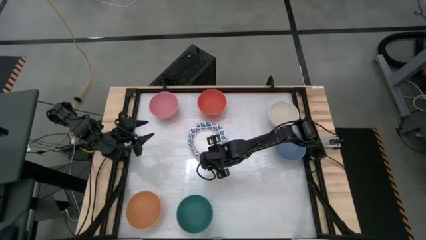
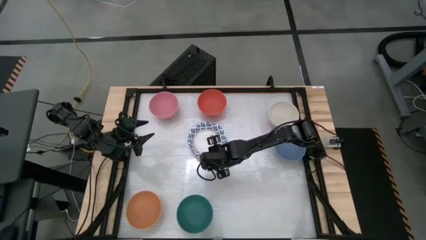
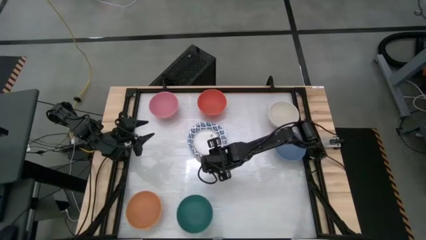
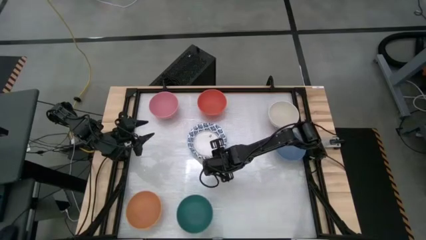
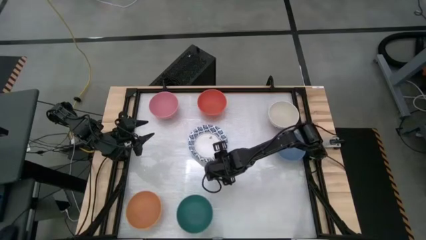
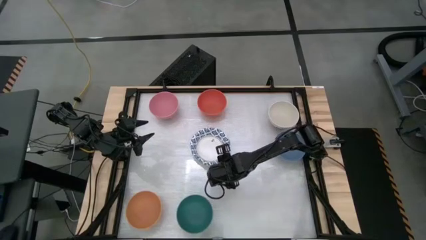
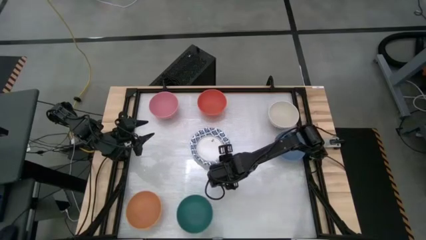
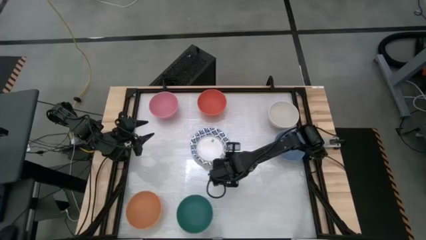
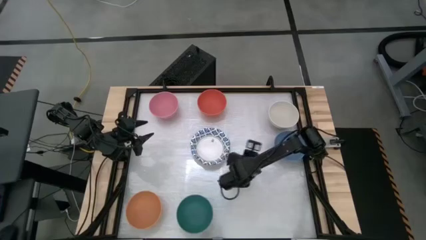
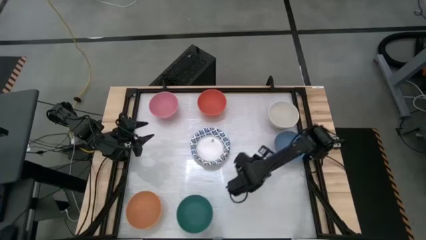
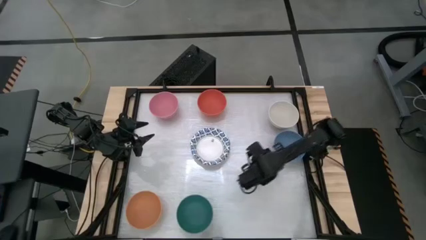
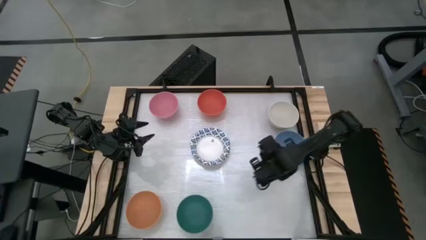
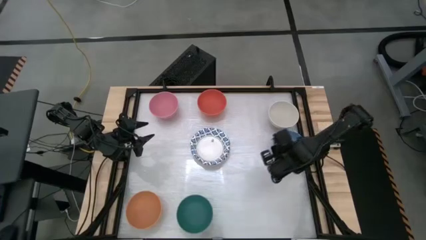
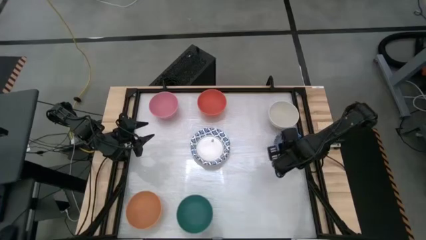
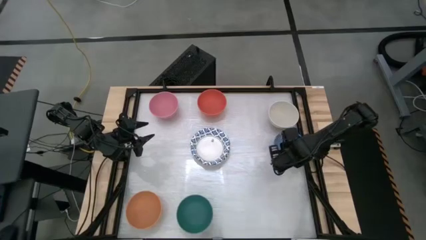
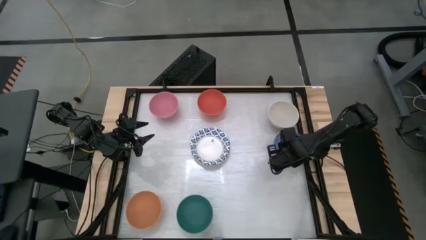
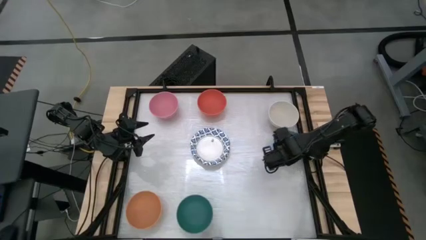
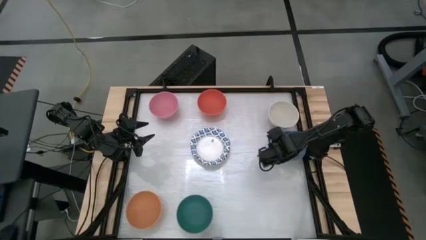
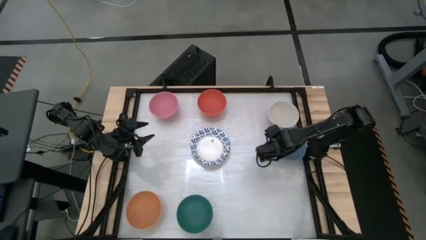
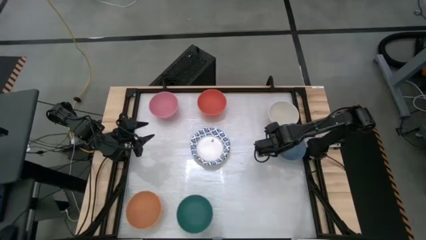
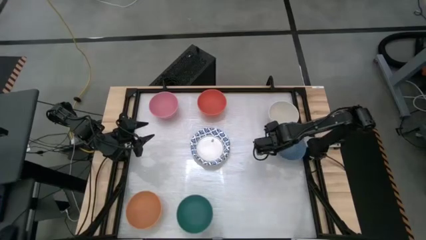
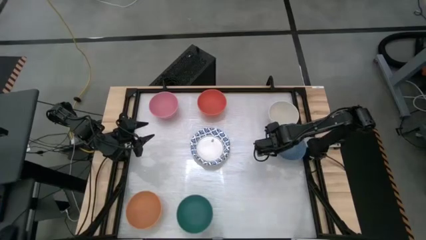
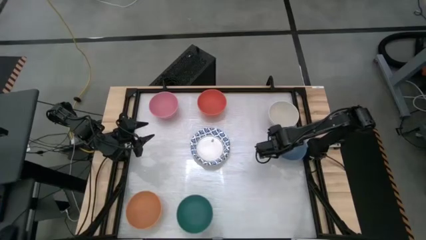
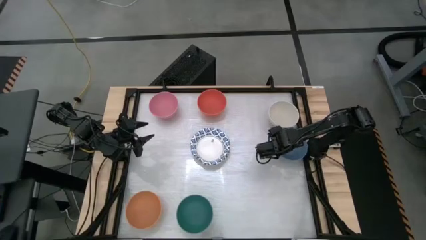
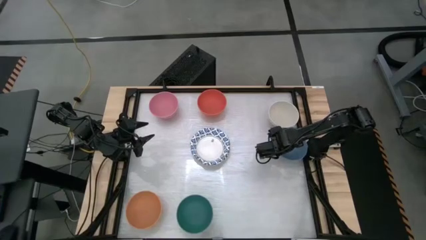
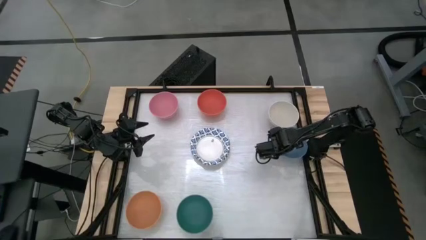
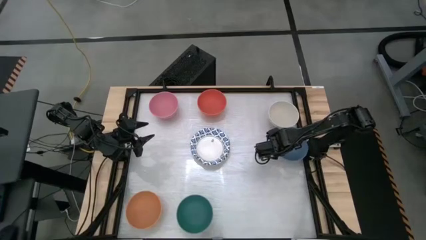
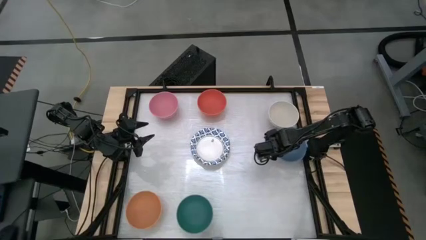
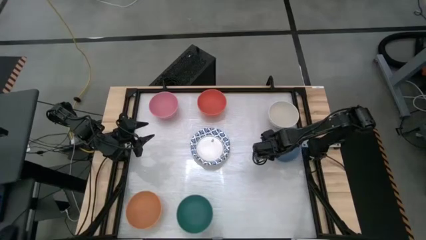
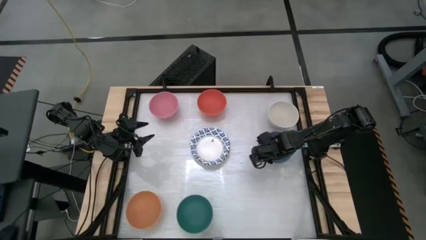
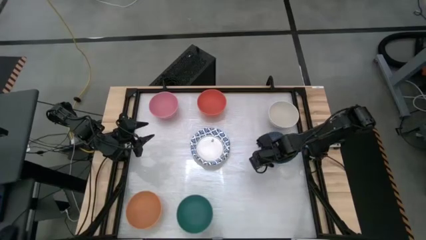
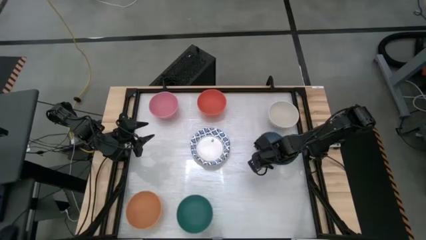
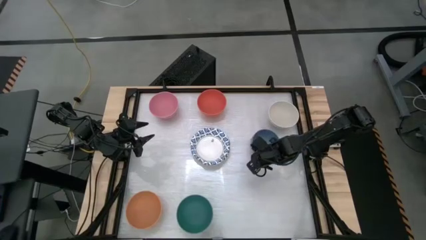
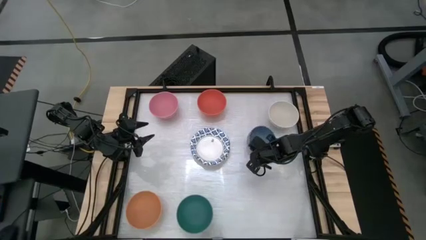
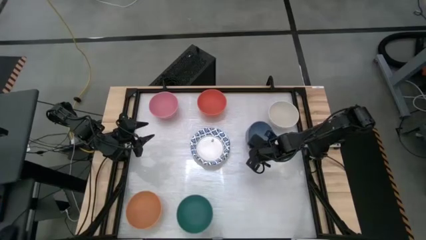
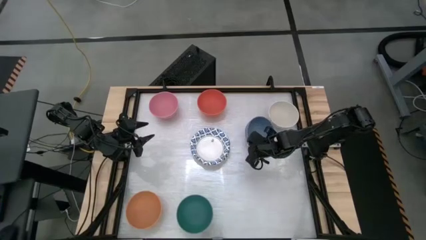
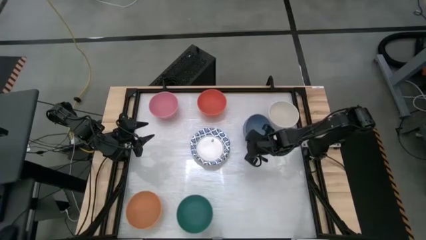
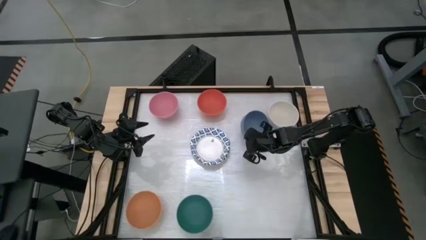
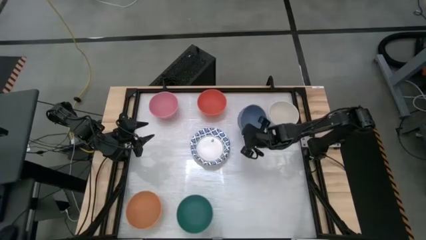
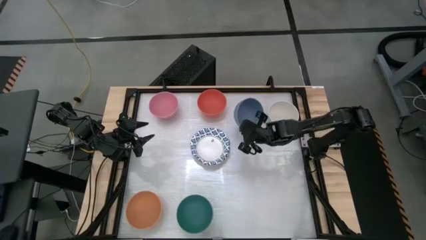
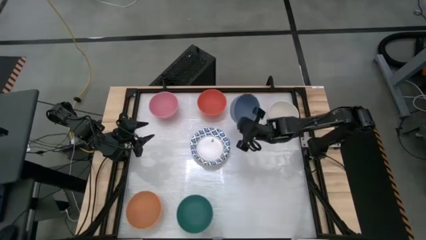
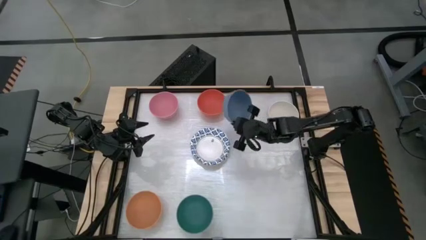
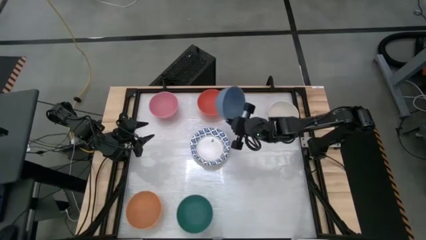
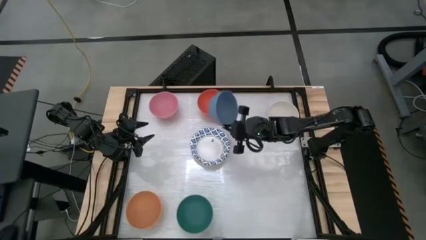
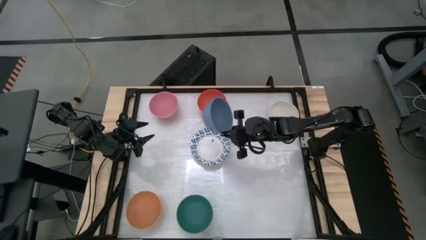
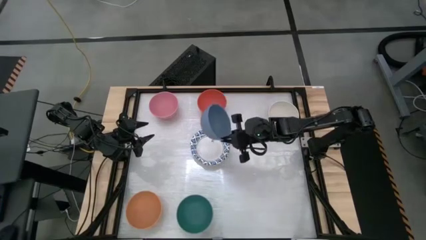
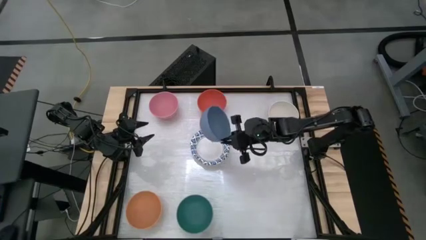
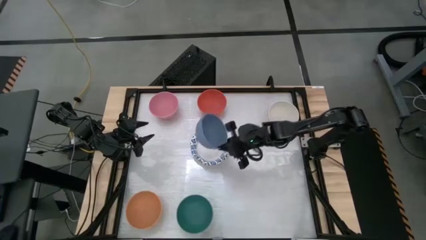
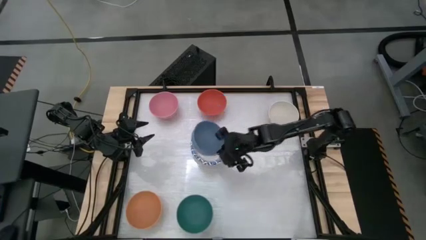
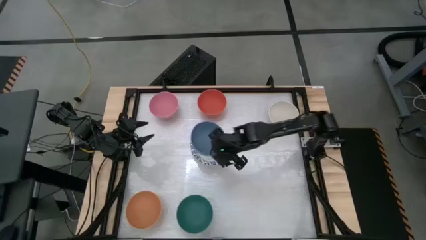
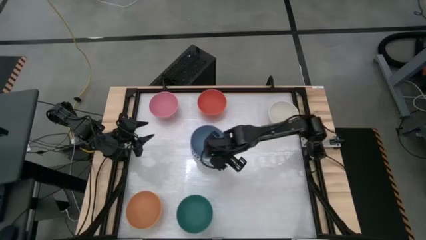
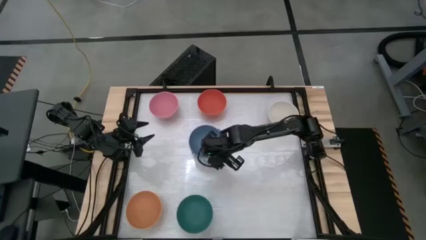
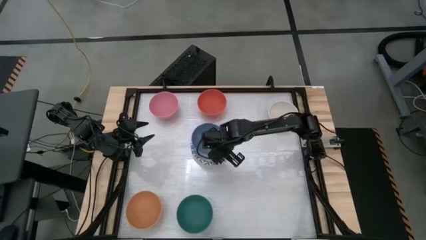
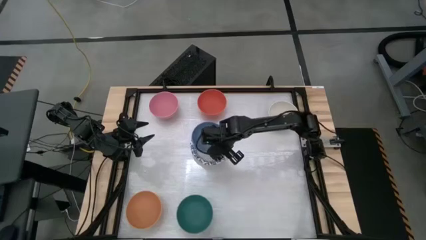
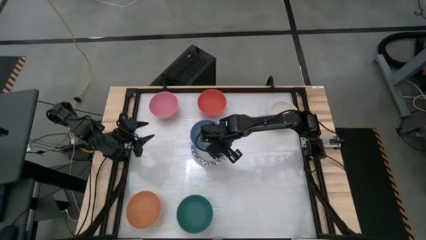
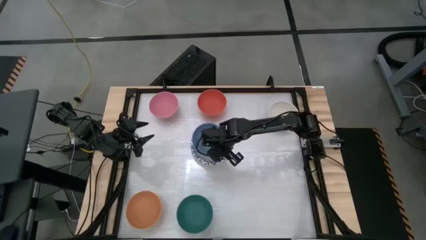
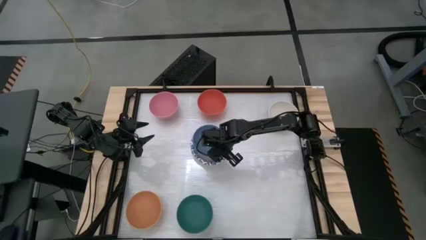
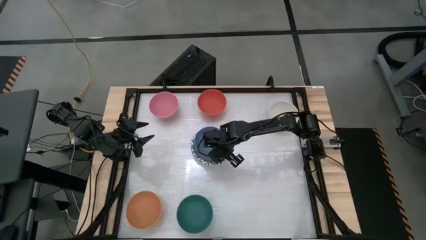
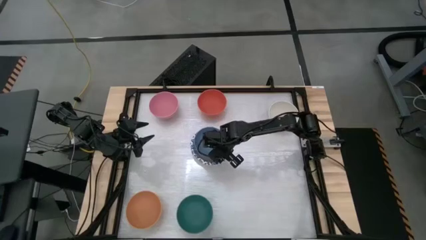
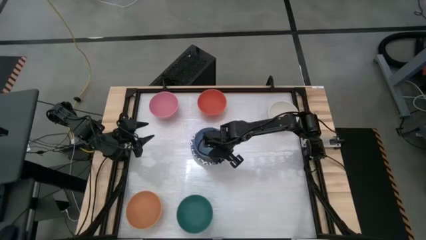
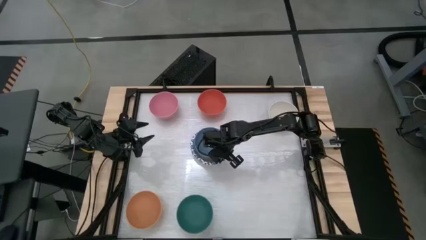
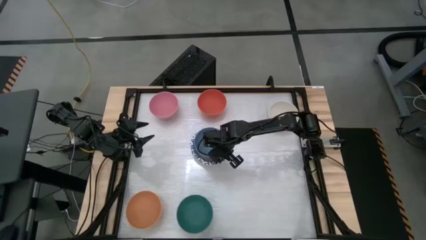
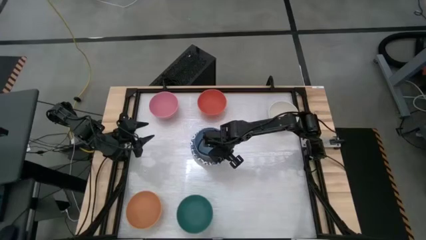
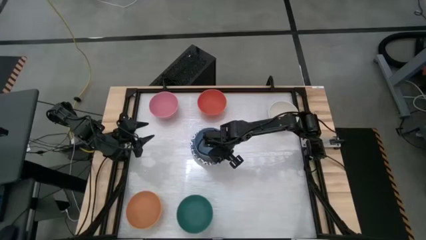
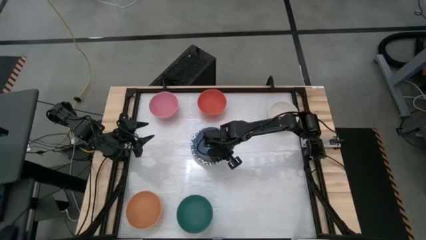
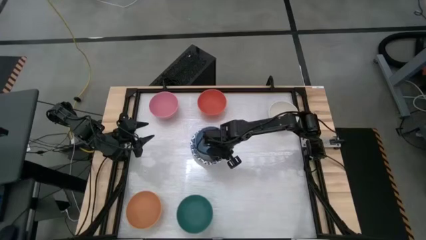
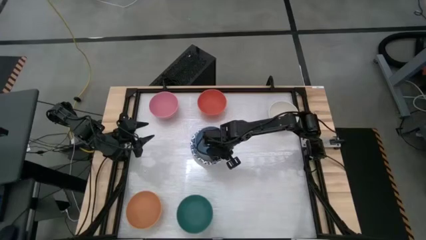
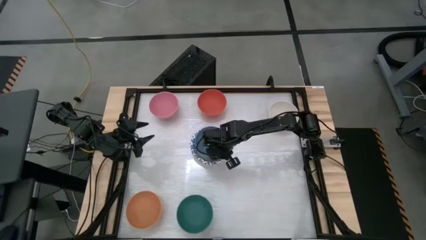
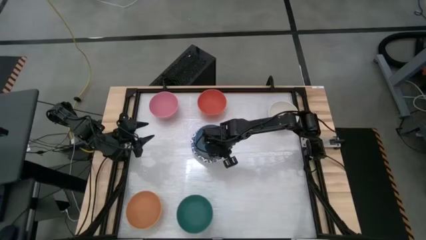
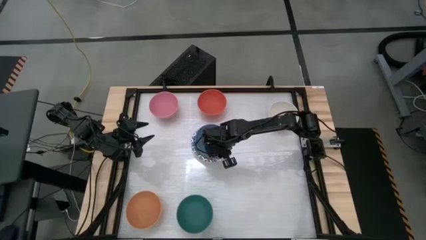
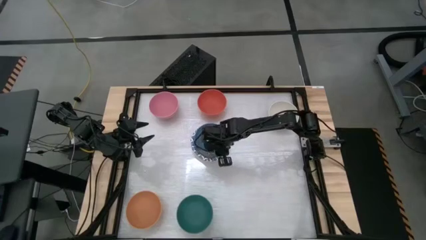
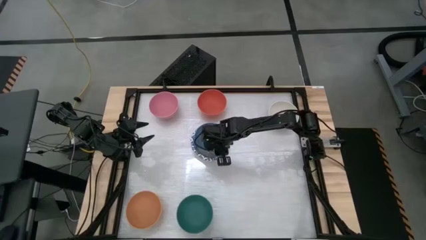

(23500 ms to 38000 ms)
Stack the blue bowl on top of the blue white patterned bowl
